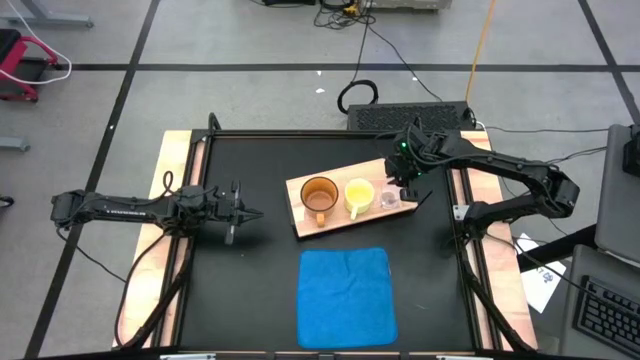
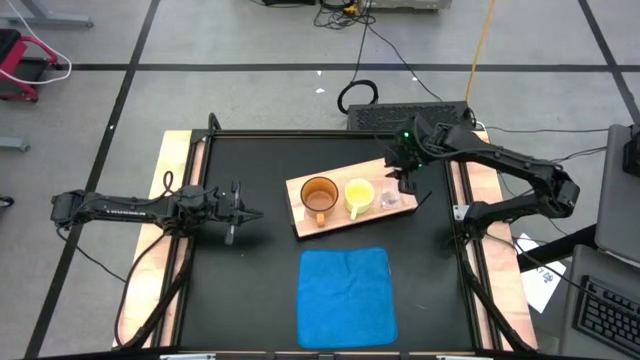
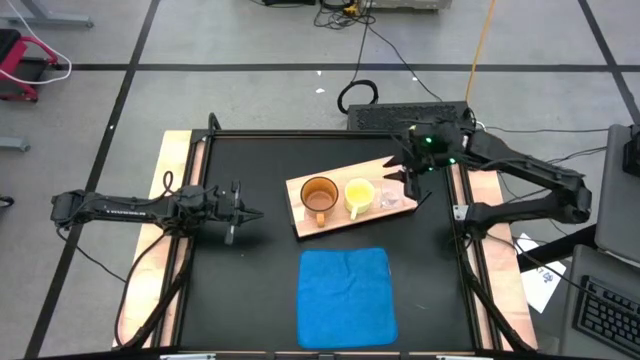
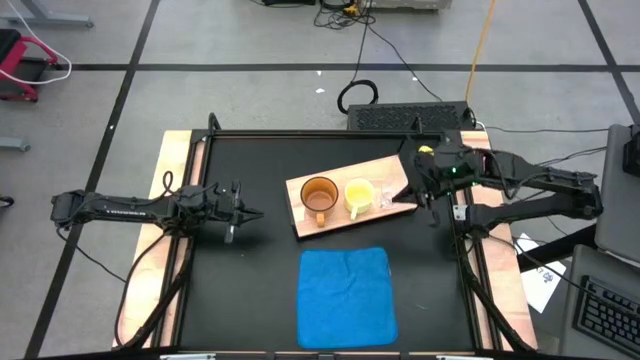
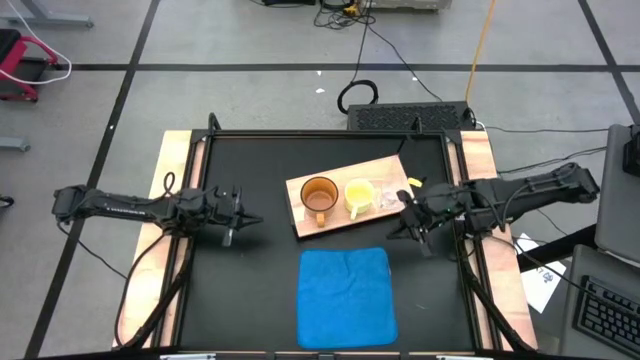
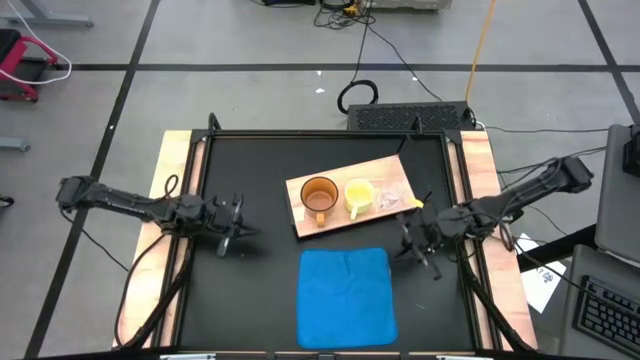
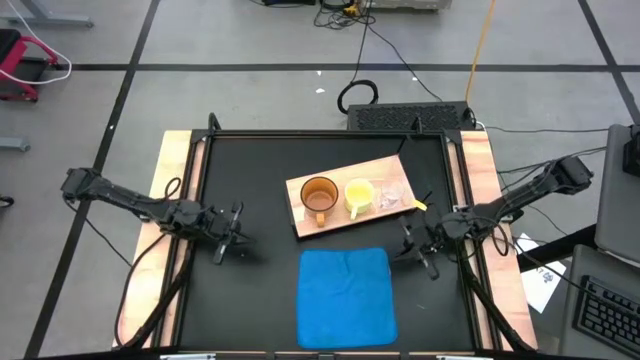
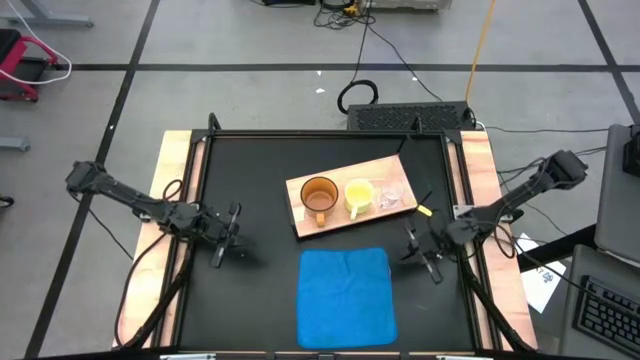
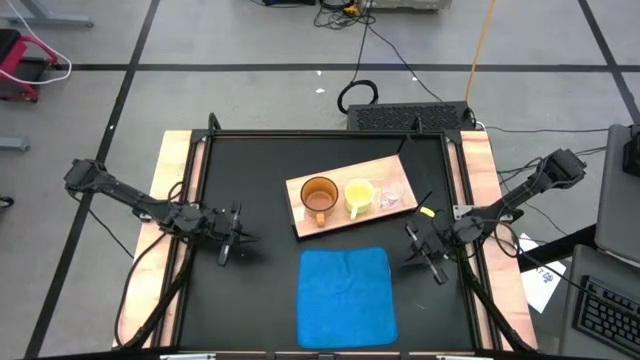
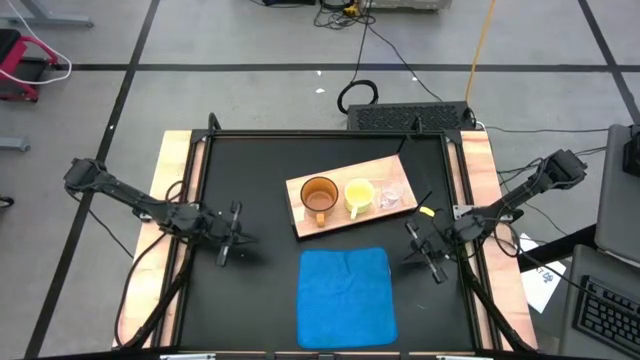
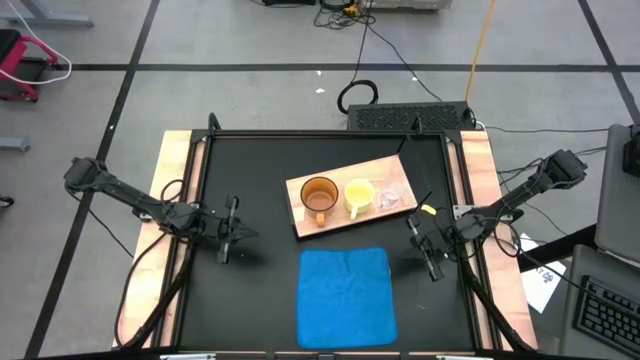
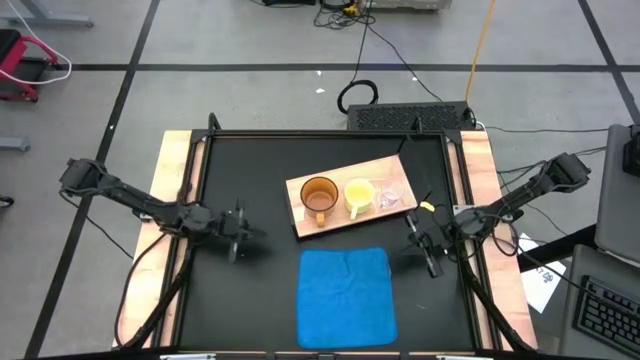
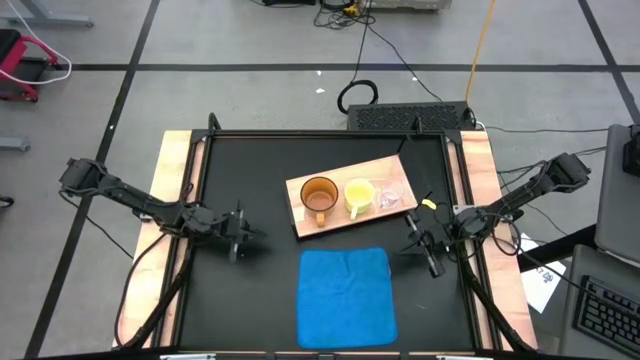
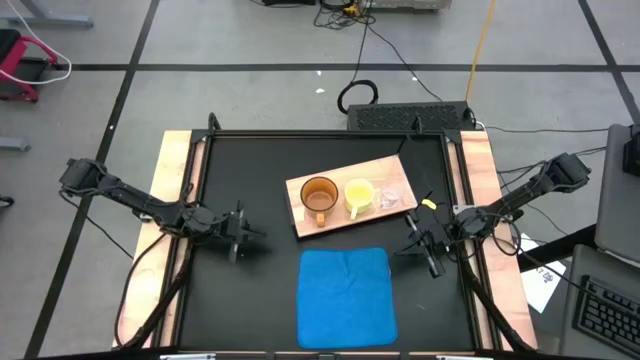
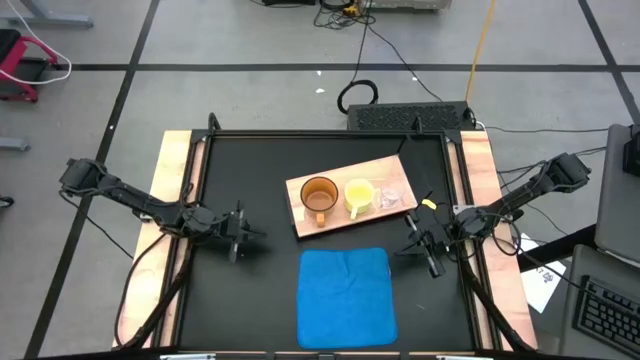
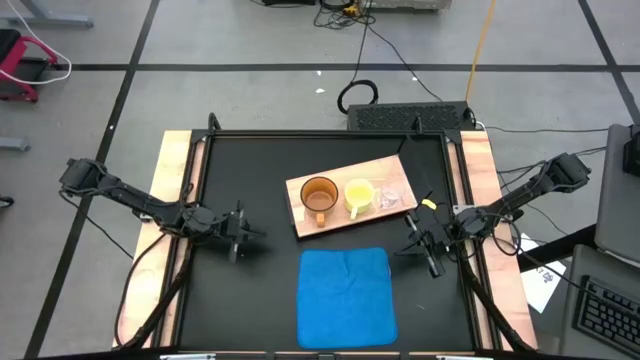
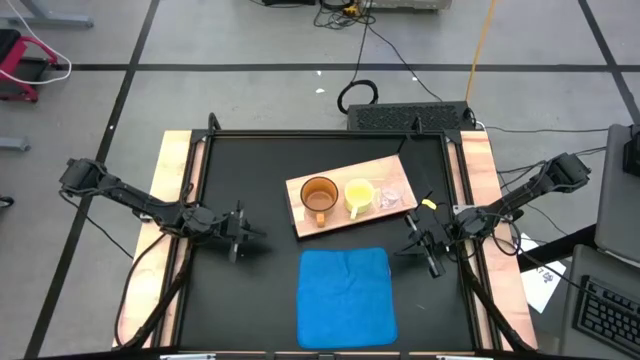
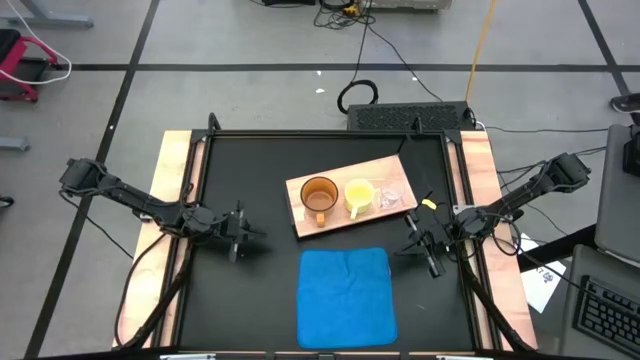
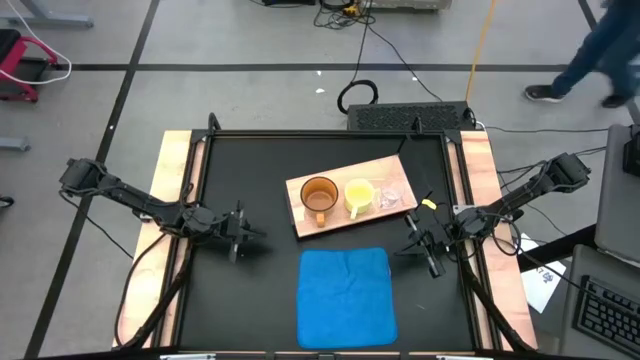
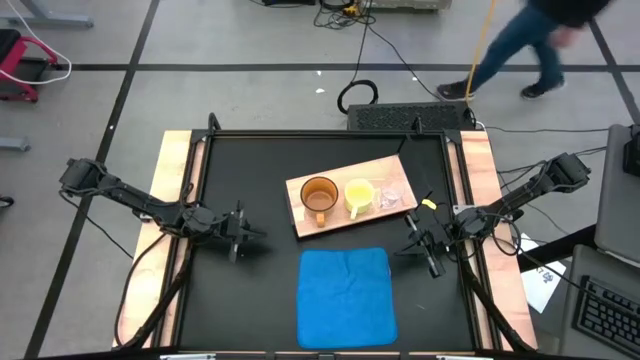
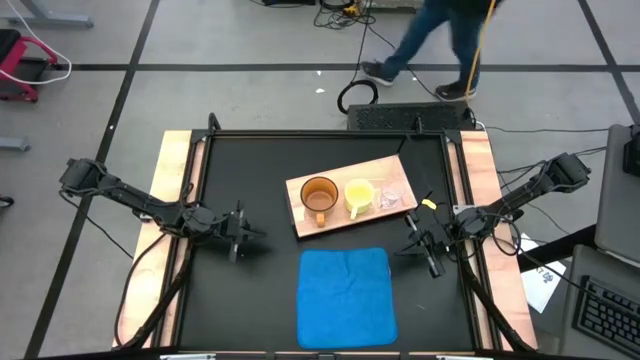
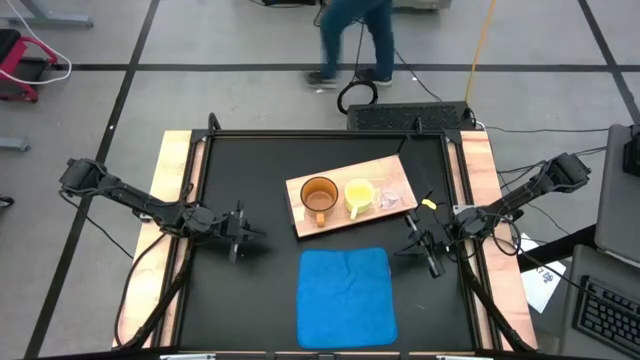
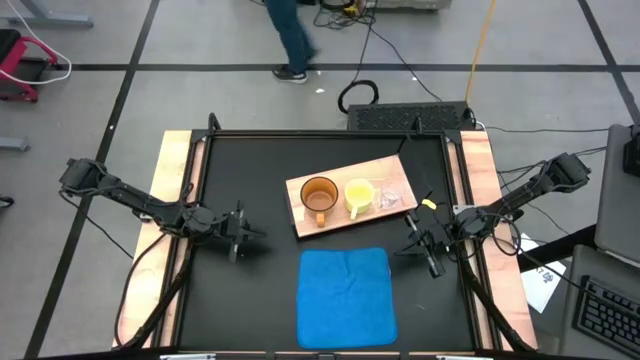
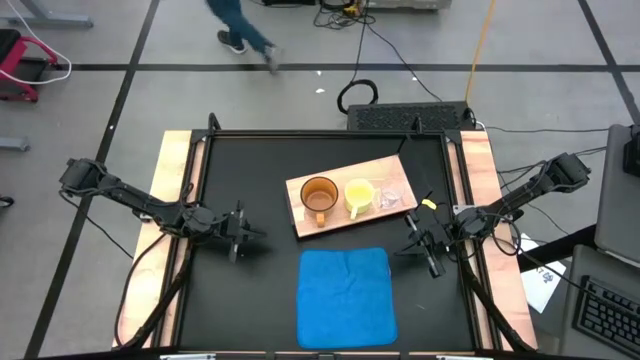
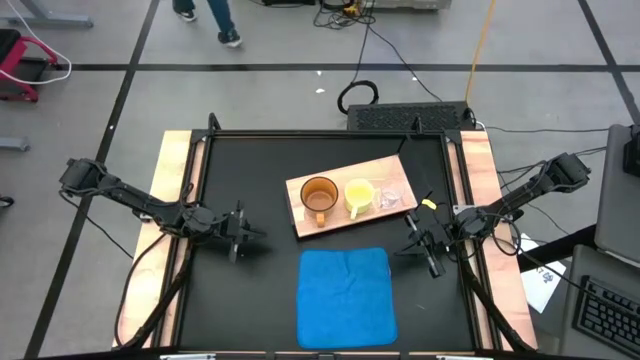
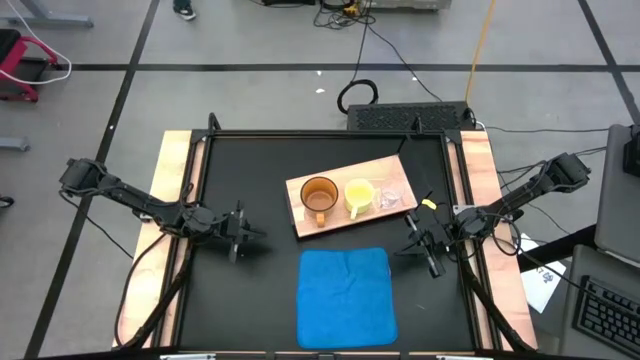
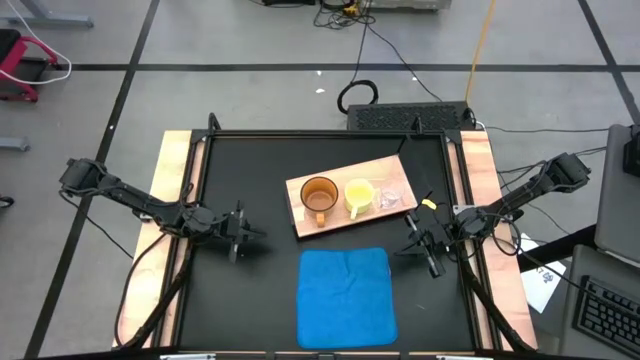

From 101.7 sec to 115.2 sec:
Task: Stack small to large cups/mugs on shelf
Return to Home Position
